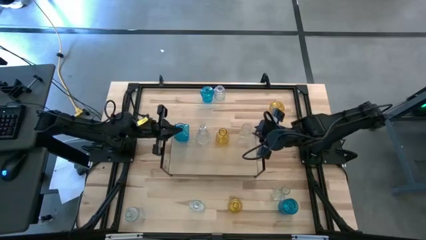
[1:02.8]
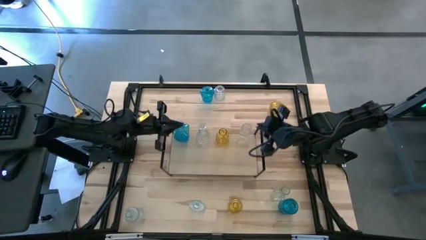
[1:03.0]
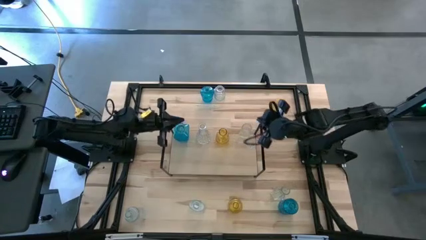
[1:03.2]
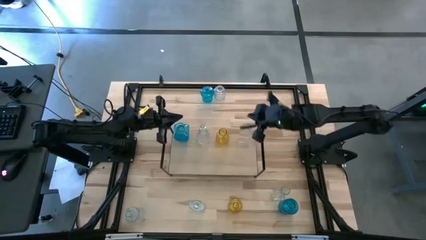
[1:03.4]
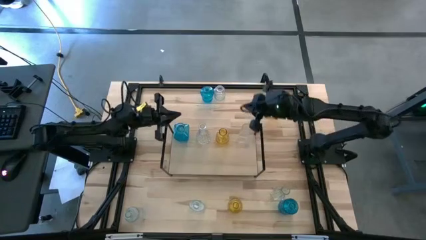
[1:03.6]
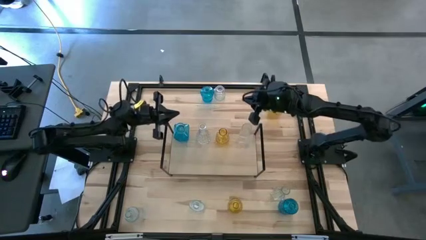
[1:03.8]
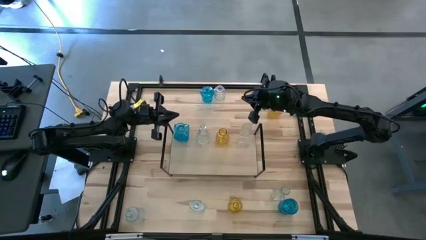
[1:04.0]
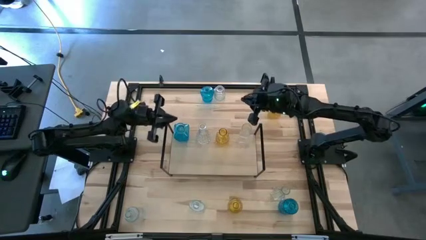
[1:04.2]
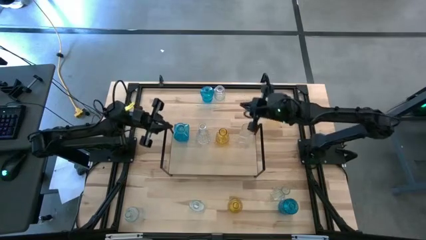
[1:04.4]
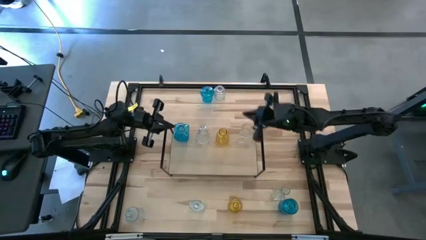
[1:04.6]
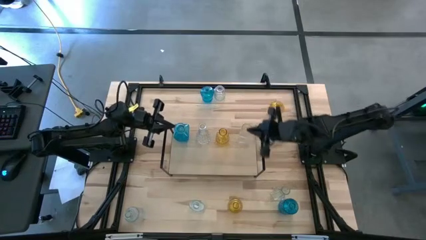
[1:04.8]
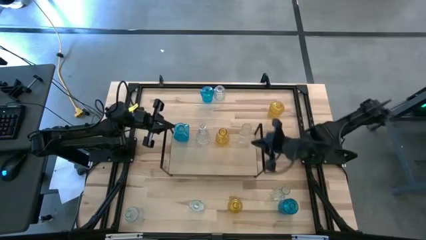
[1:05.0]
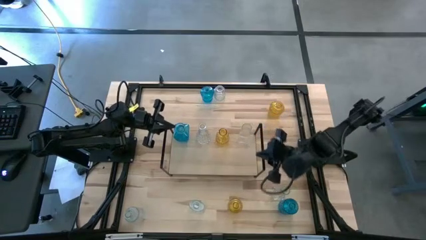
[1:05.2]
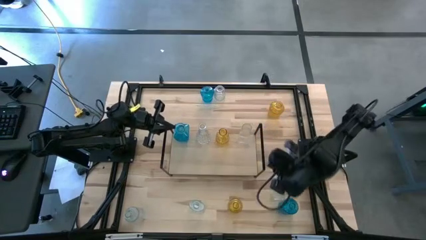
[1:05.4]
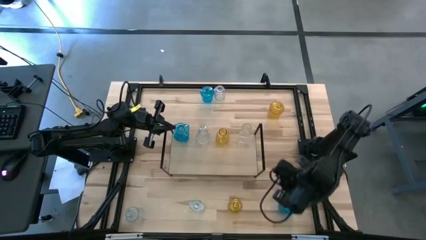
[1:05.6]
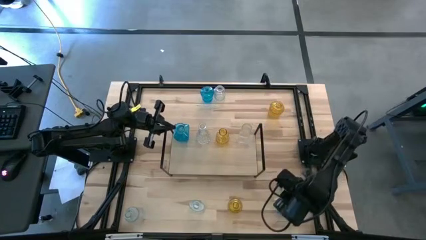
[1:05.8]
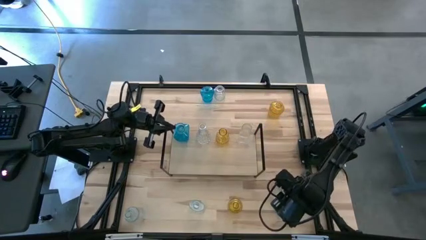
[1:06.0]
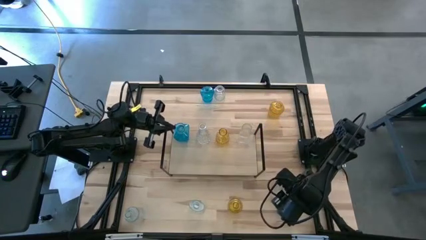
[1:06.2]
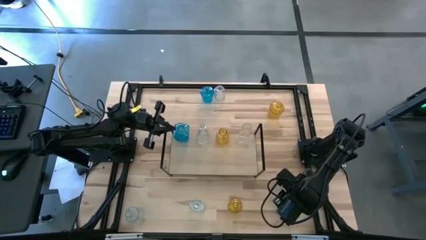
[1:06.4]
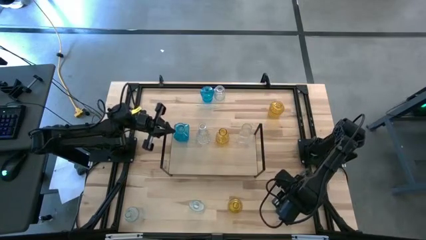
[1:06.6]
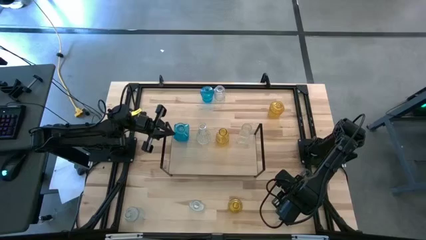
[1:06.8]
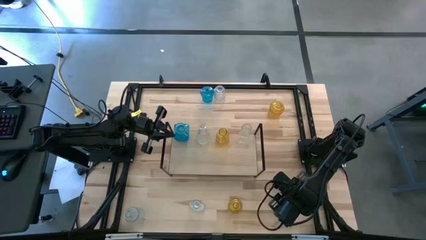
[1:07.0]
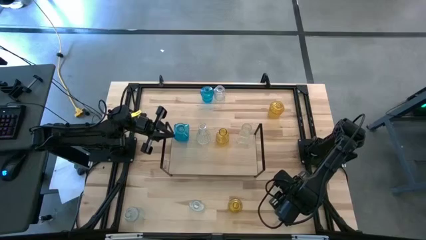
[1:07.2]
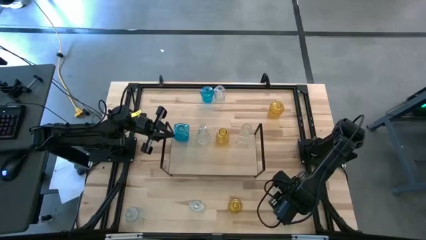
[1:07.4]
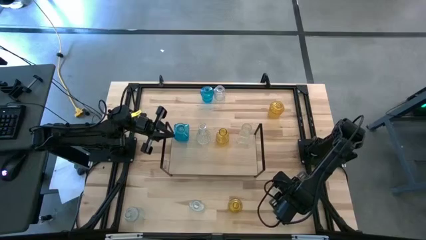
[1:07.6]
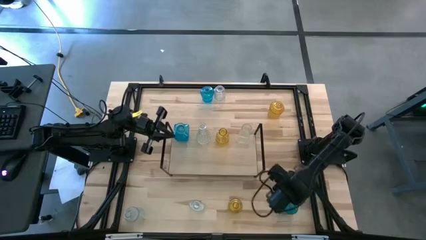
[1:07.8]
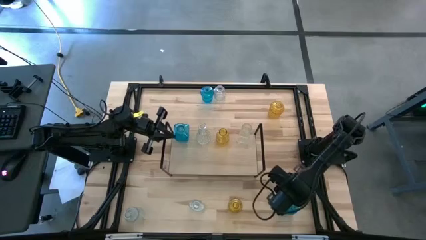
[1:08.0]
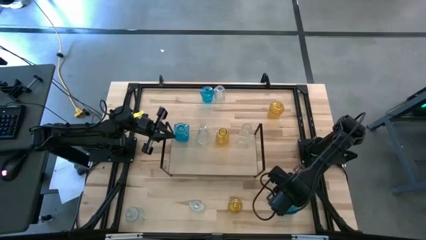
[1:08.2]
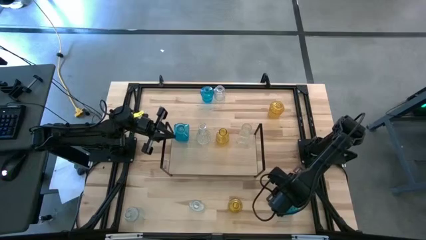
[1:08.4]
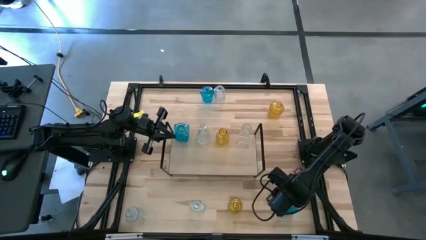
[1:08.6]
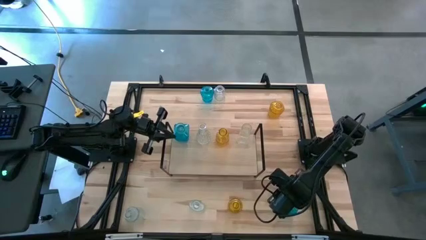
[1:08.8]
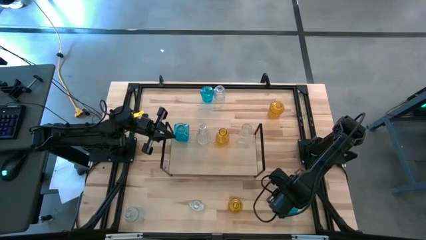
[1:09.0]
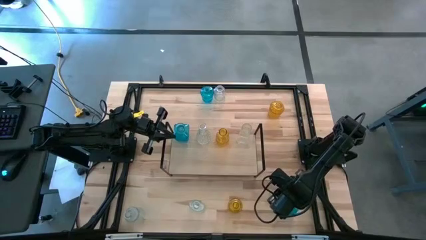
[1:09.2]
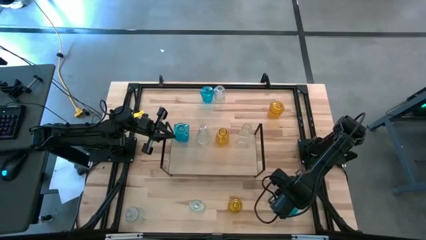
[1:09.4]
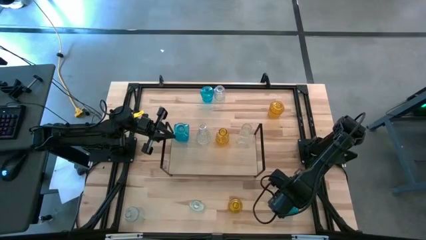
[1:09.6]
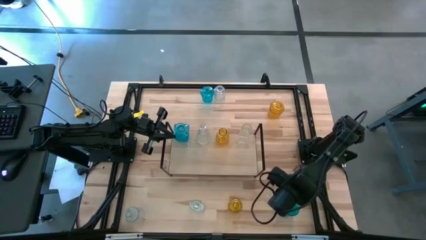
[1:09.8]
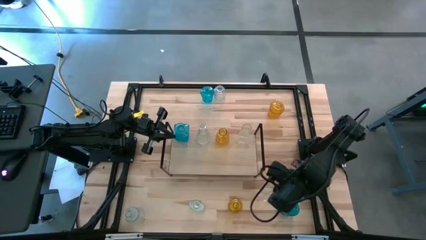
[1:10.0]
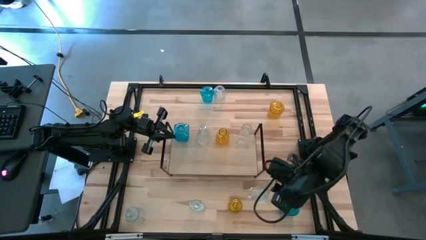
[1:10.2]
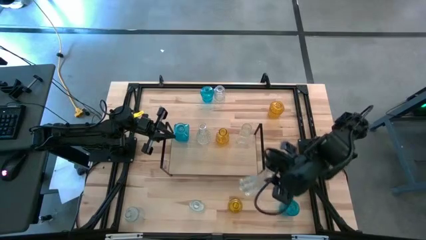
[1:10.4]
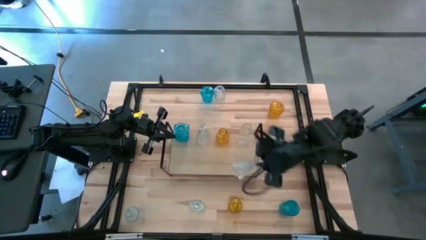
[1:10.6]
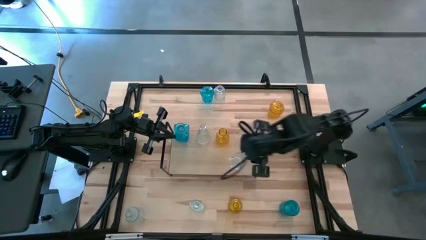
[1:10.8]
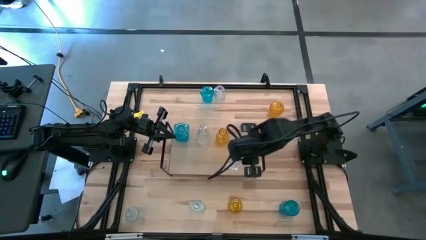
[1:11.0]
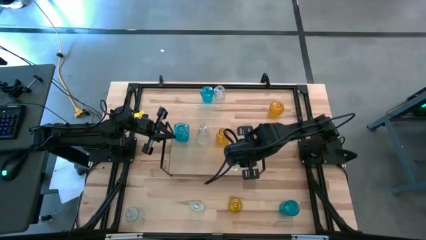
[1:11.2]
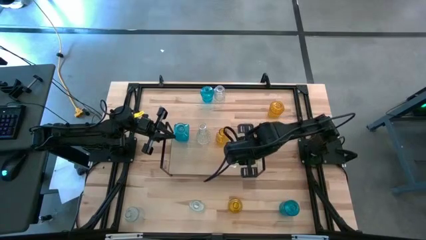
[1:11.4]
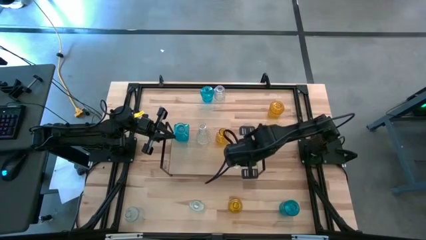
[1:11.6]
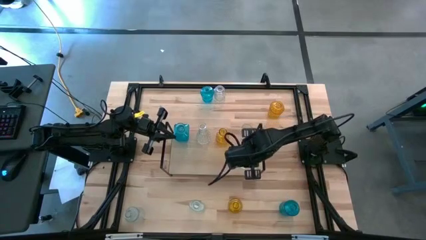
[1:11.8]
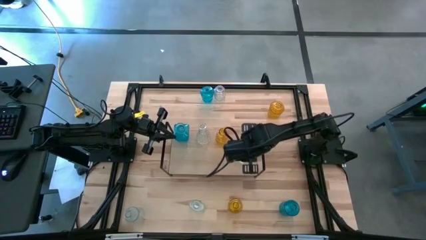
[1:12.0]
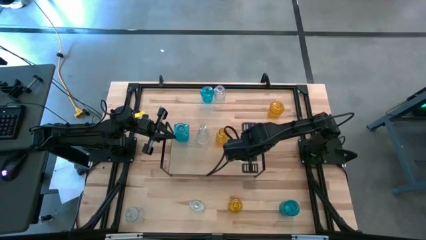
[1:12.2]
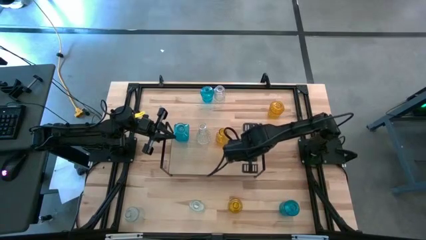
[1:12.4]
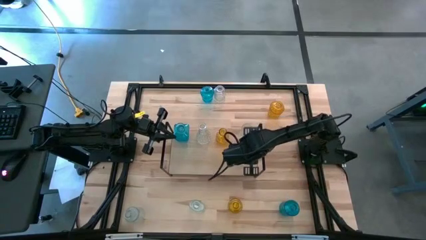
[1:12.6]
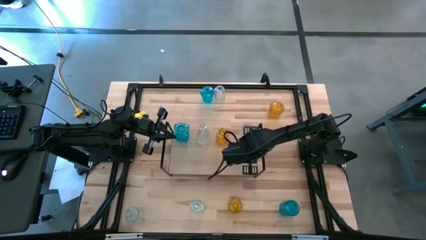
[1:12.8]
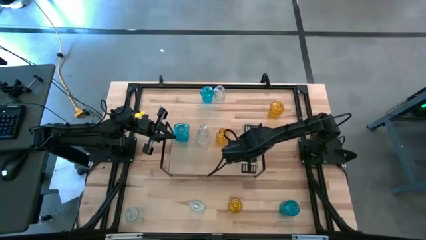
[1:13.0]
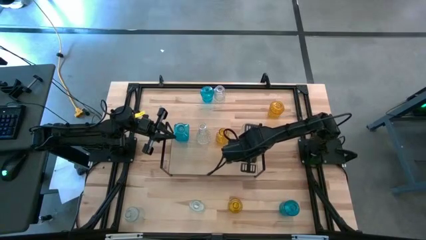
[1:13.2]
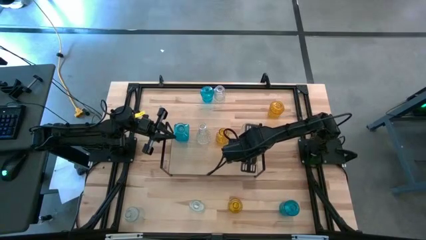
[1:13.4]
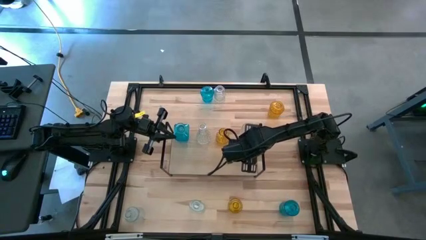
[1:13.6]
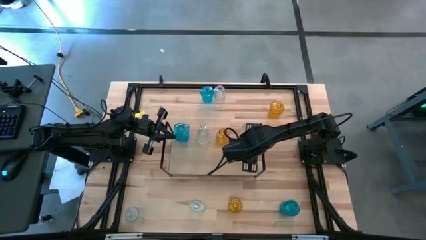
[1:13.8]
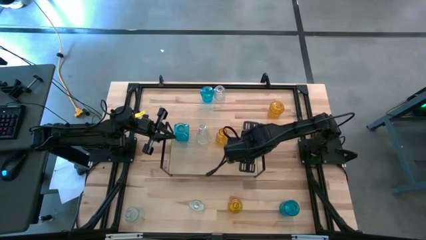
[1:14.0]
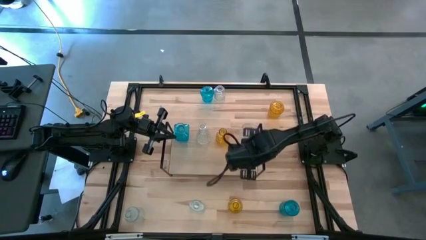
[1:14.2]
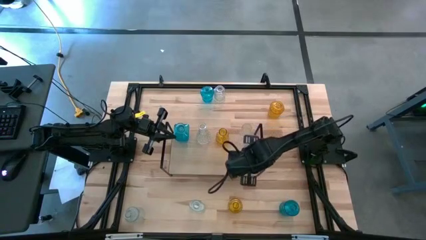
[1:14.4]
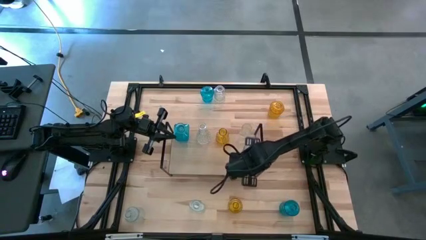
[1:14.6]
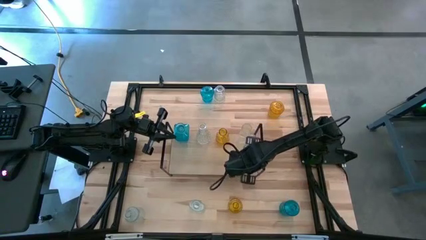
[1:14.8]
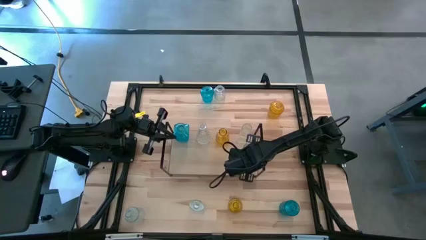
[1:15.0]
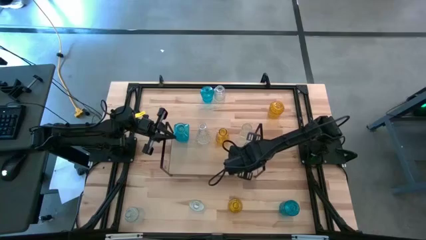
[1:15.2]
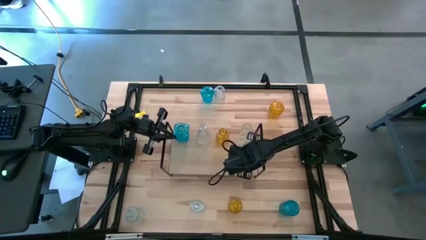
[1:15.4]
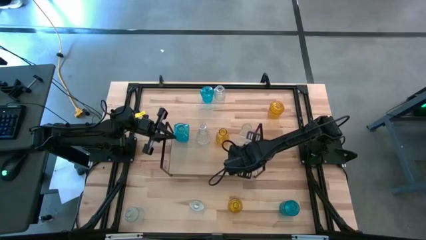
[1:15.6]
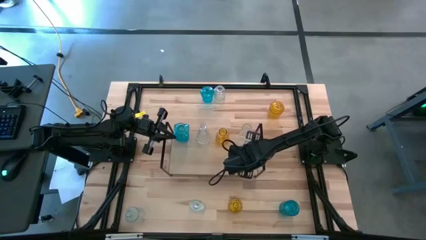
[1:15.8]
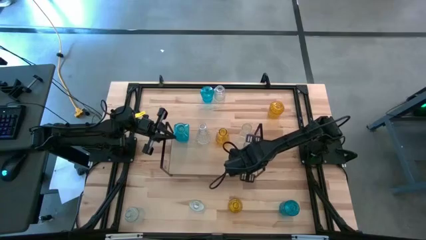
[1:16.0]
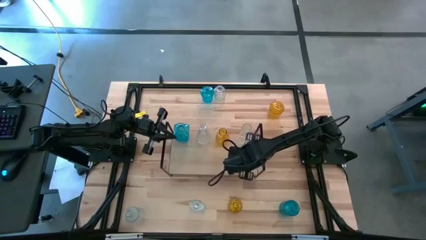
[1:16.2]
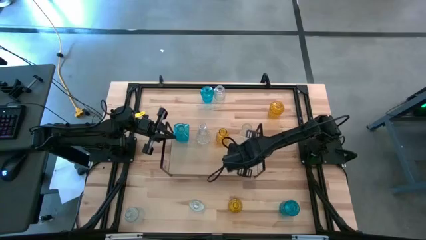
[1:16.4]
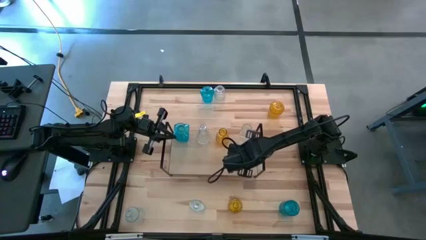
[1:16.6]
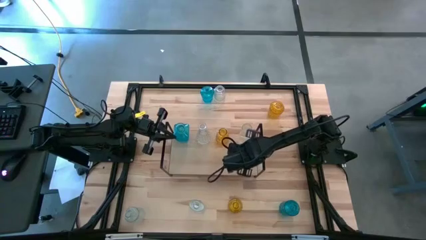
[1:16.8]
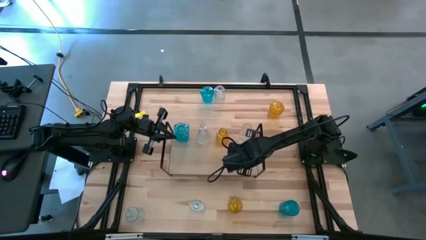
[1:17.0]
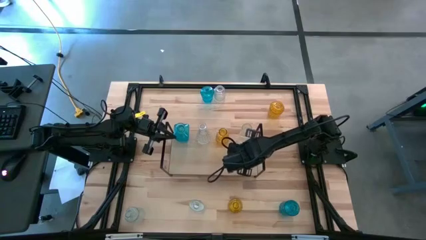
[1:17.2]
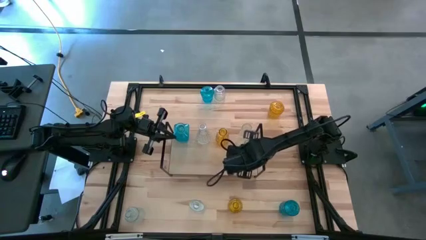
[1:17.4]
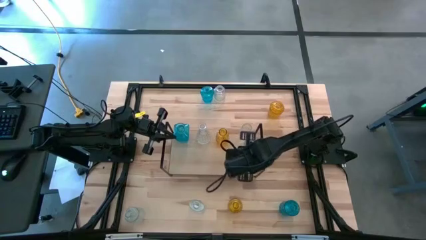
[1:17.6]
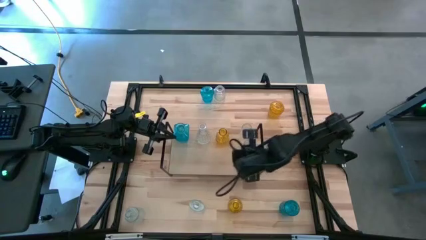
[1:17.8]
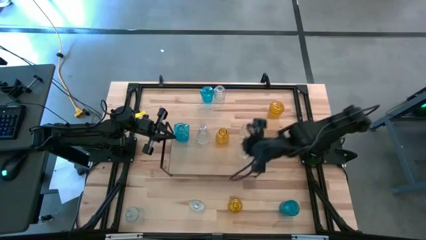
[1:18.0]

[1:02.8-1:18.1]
Task: sort vases onto shelf
Put the bottom right transparent vase on the shelf

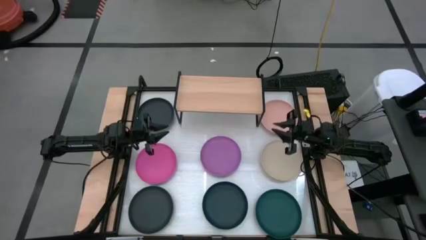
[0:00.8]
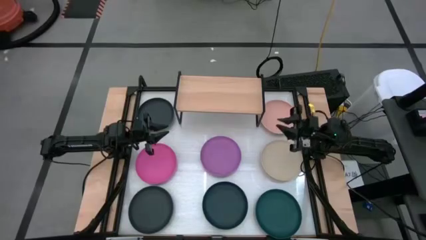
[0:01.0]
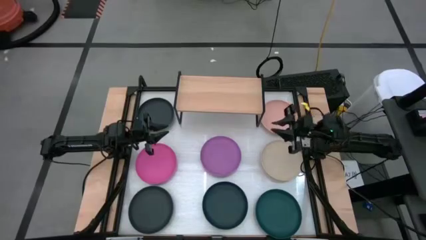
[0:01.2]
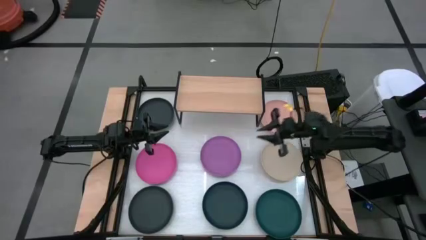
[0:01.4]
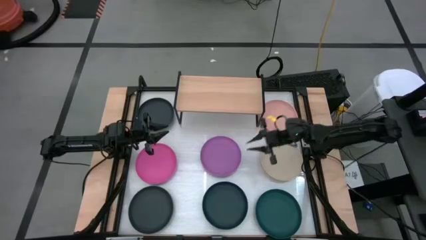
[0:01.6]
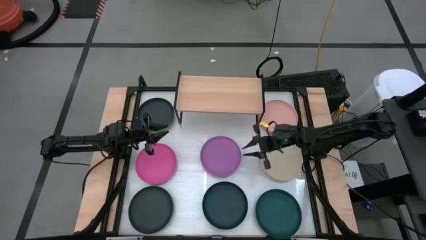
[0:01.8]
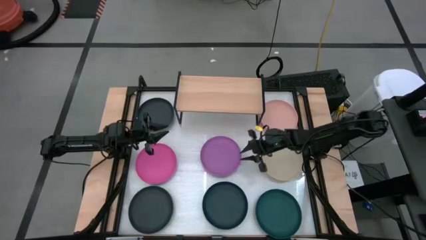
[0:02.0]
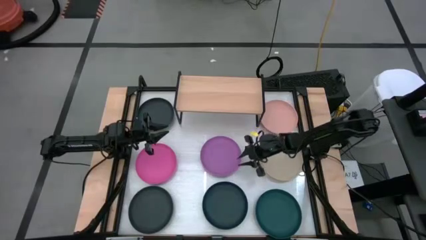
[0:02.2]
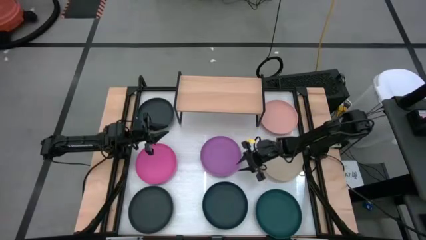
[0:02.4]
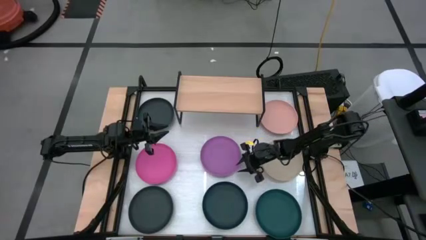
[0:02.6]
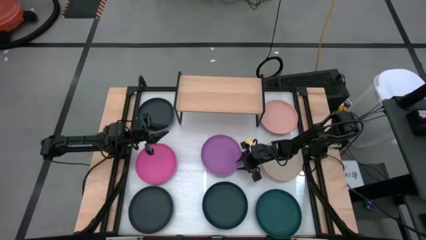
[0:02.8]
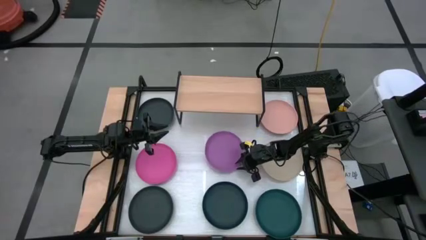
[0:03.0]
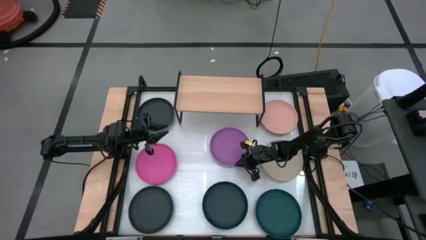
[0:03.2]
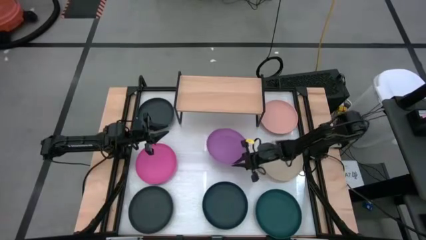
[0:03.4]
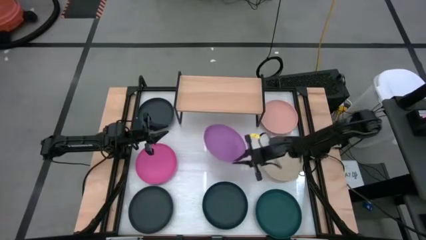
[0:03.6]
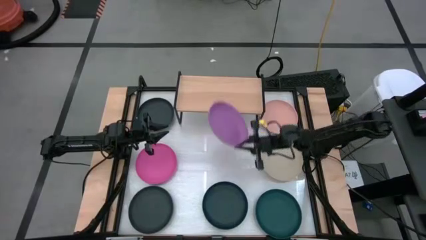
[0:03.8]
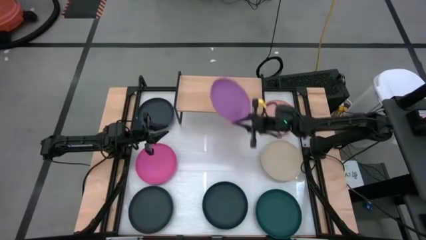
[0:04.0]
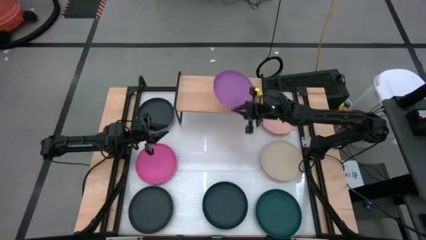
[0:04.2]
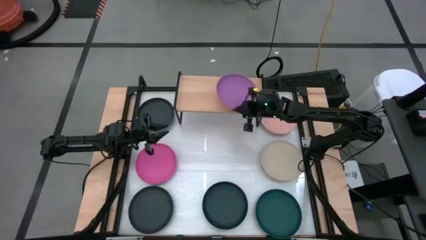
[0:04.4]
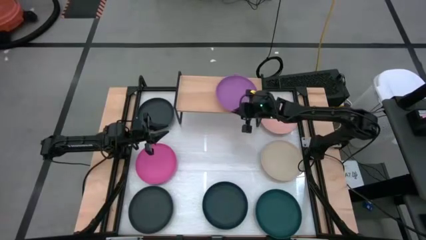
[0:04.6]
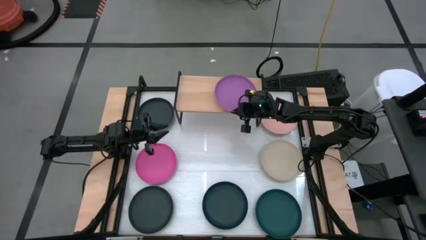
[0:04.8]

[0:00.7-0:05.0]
Task: Place and stack plates onto a shelf
Put the purple plate on the shelf
